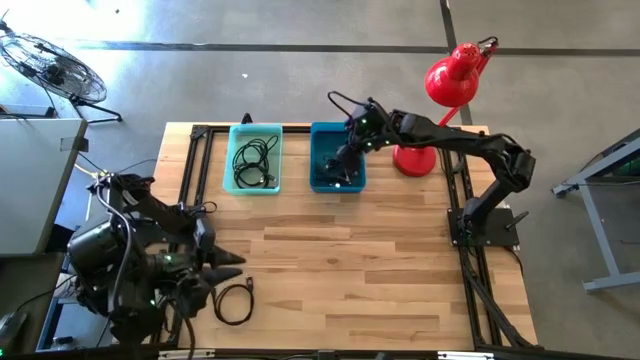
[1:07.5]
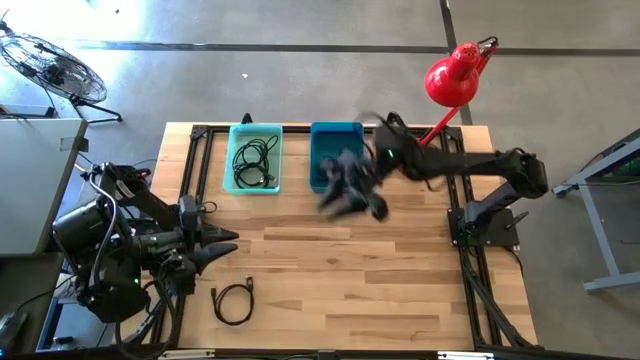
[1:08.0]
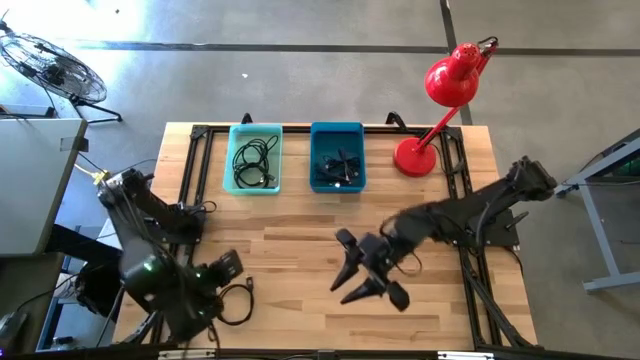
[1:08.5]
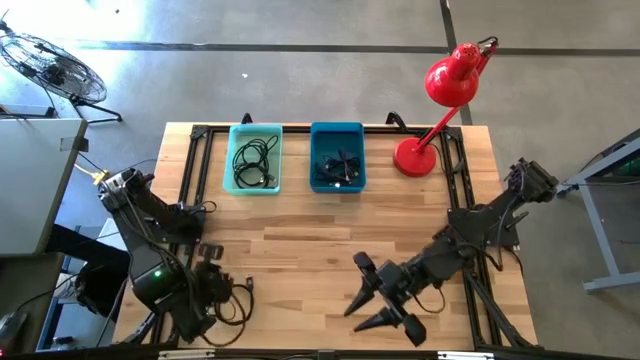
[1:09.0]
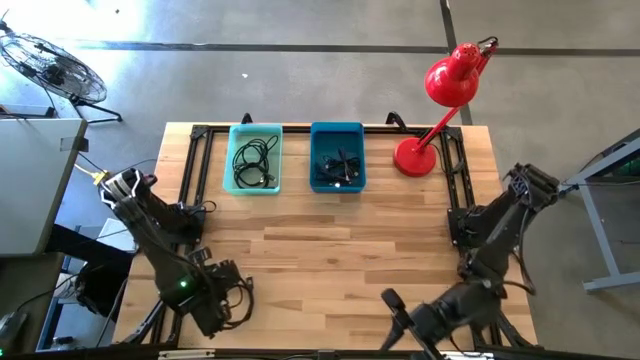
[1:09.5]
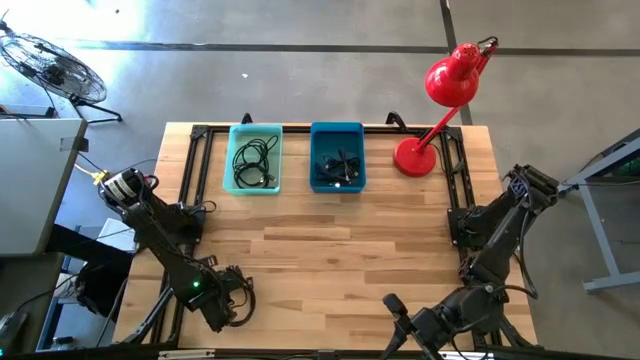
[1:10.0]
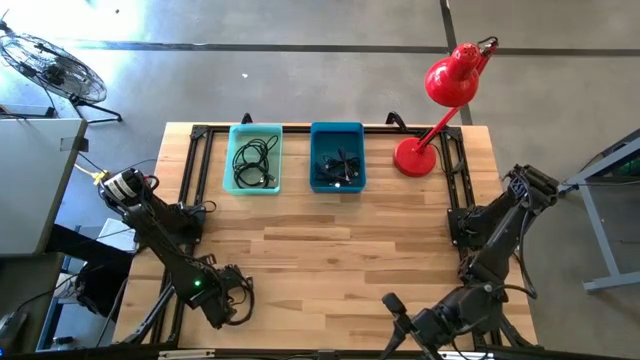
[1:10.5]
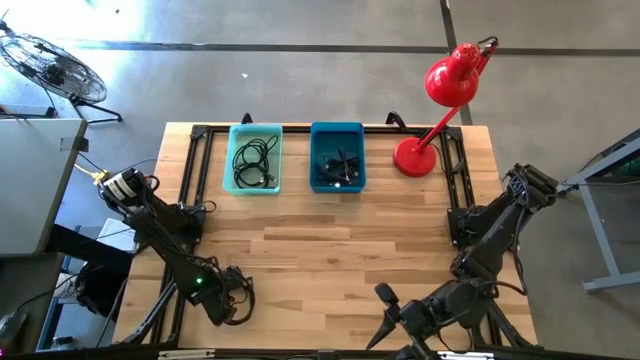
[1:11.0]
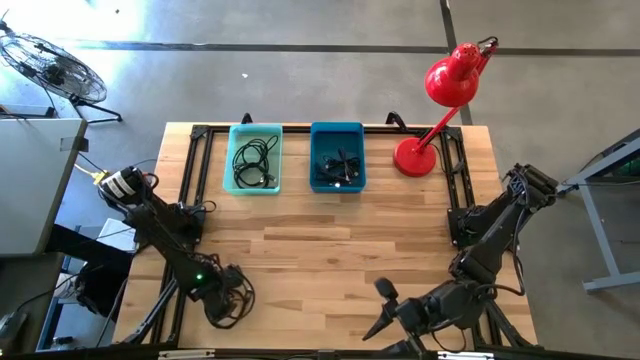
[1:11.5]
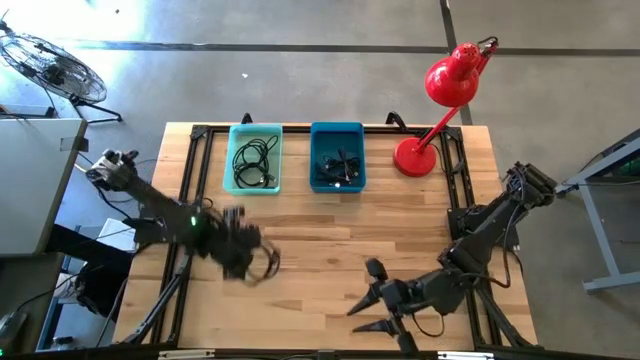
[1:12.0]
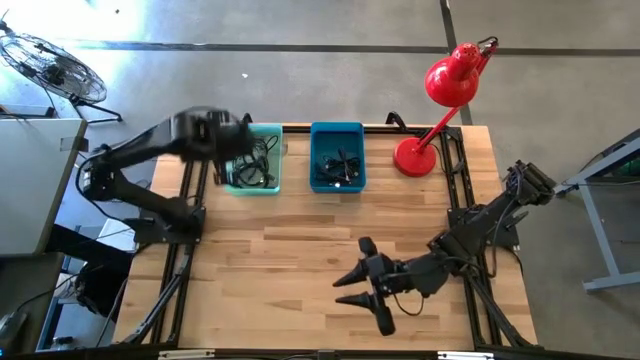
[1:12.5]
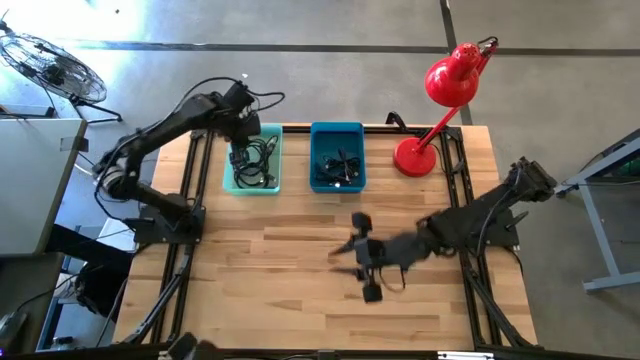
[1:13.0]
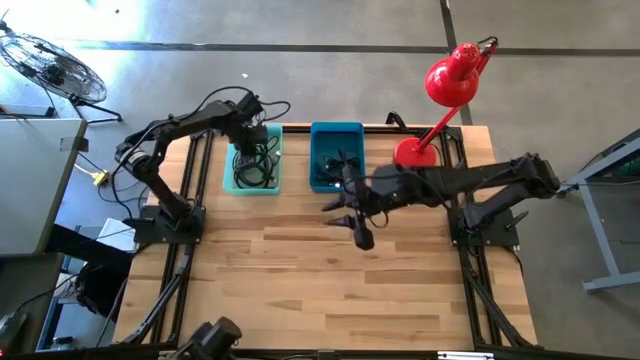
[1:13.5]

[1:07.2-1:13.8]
Task: Pick & Place USB Port
Put the black HDMI cable into the green bin

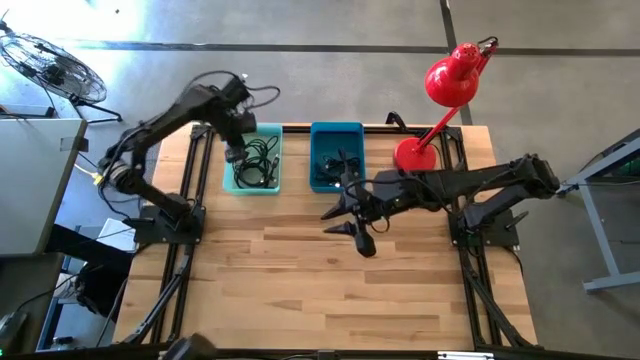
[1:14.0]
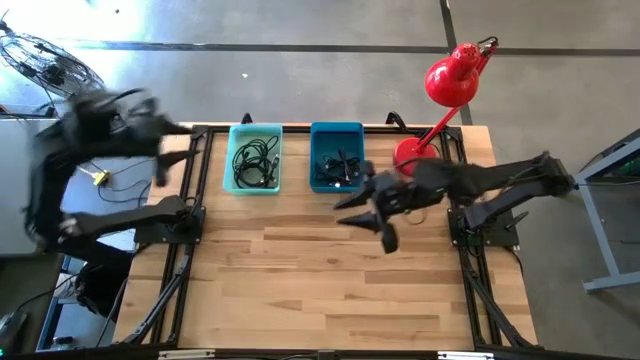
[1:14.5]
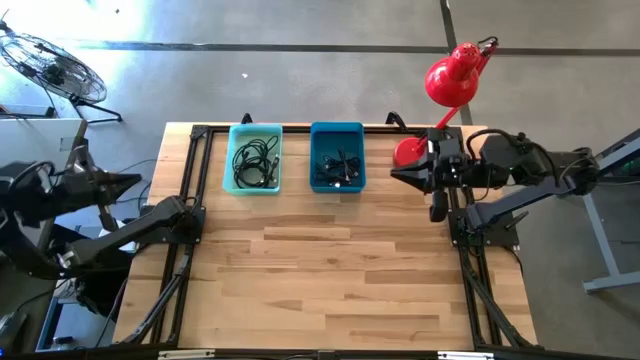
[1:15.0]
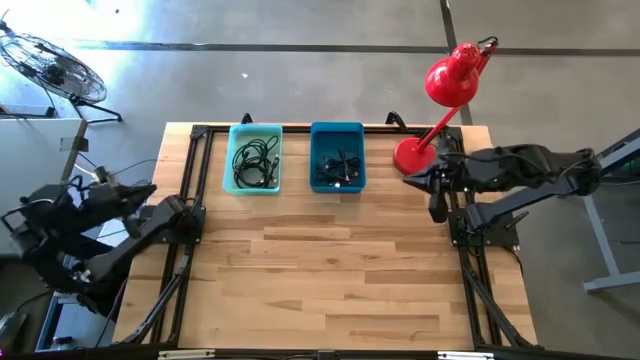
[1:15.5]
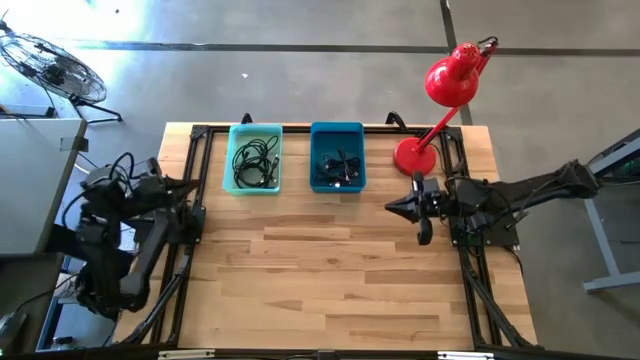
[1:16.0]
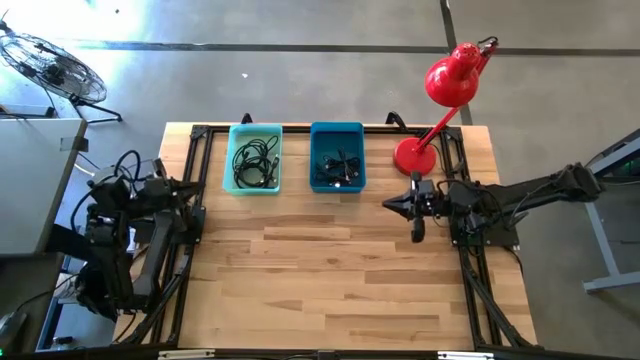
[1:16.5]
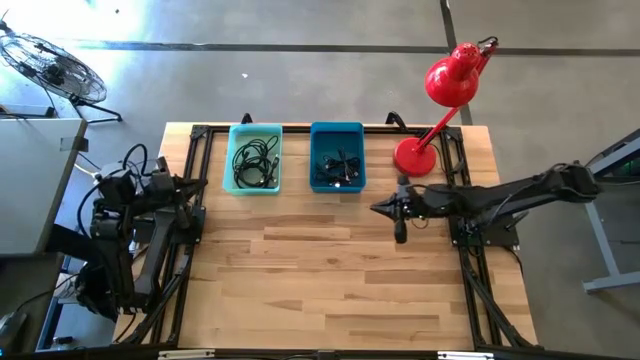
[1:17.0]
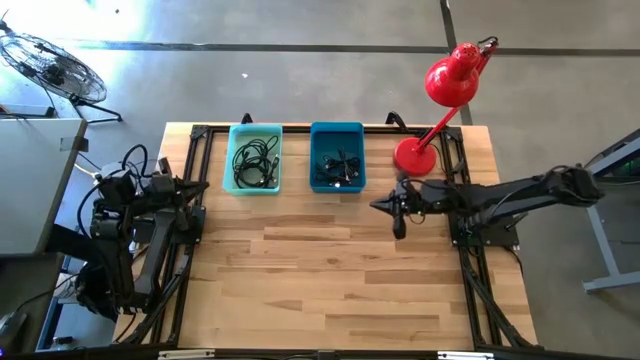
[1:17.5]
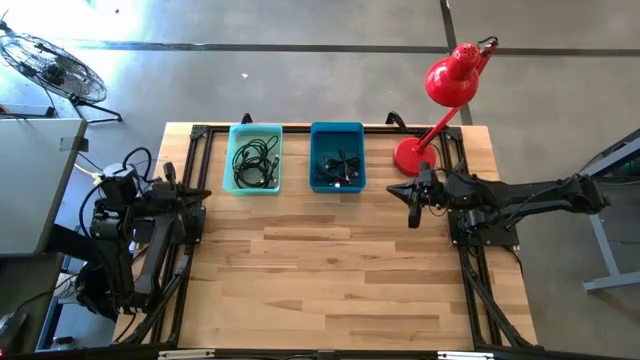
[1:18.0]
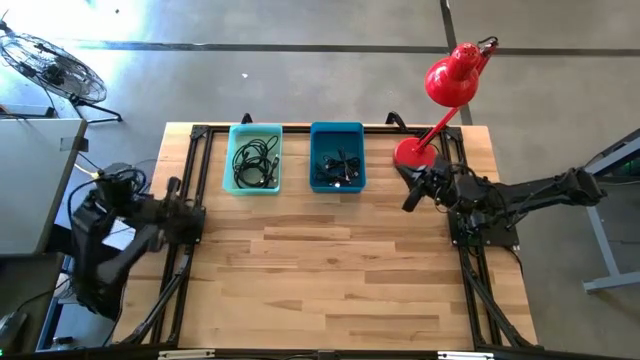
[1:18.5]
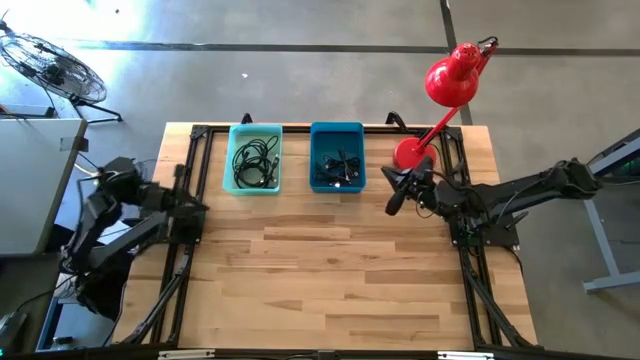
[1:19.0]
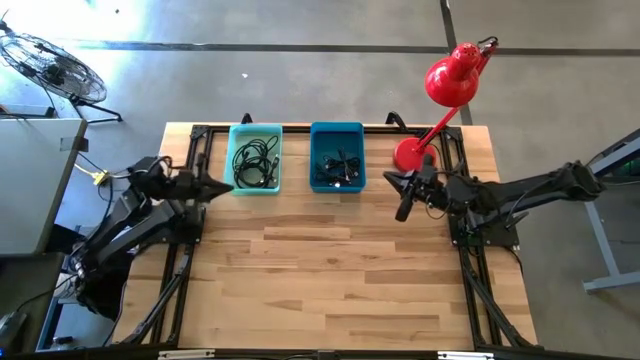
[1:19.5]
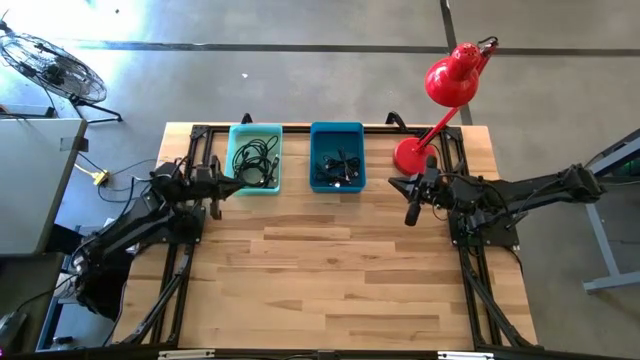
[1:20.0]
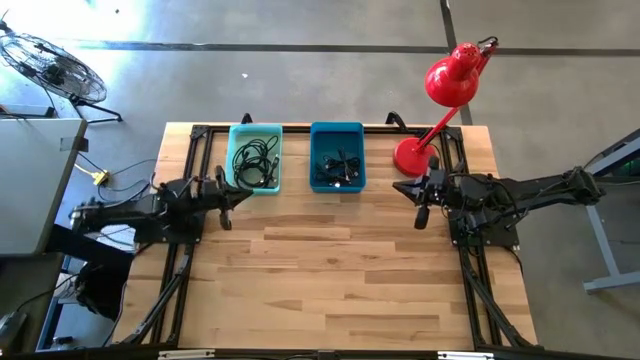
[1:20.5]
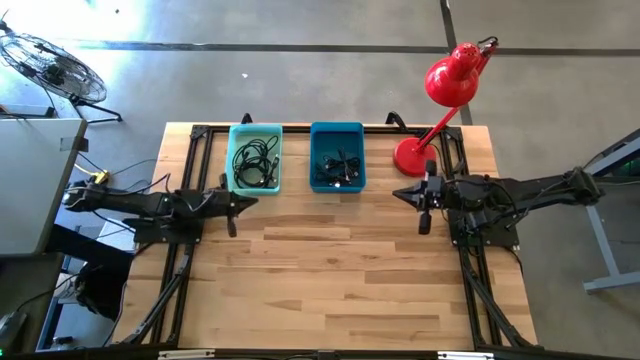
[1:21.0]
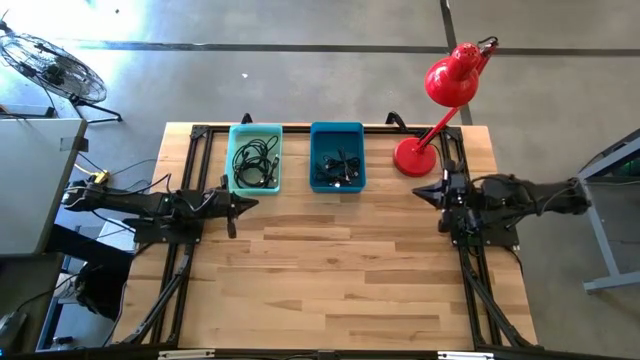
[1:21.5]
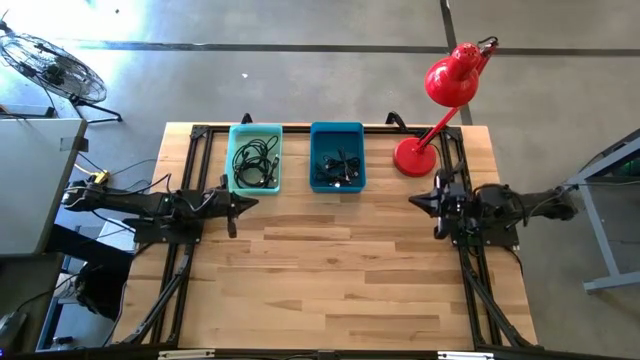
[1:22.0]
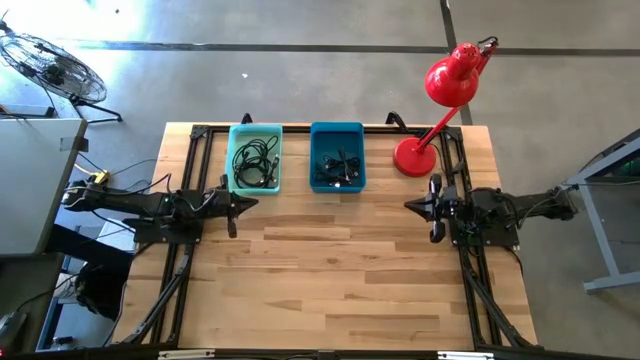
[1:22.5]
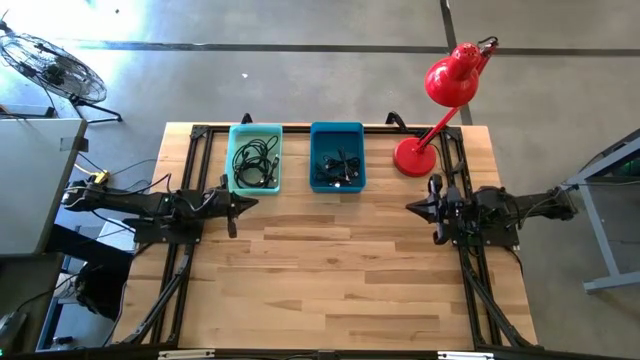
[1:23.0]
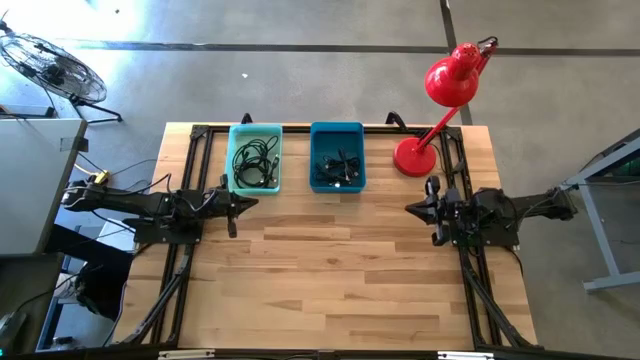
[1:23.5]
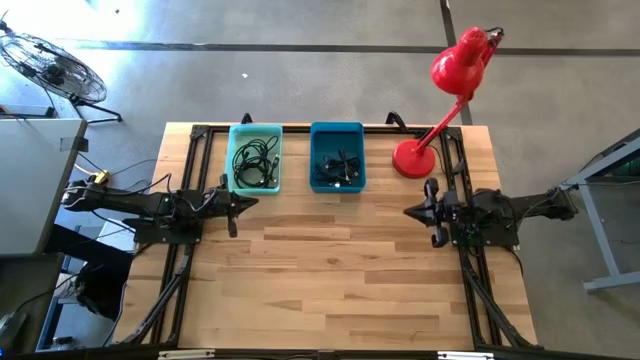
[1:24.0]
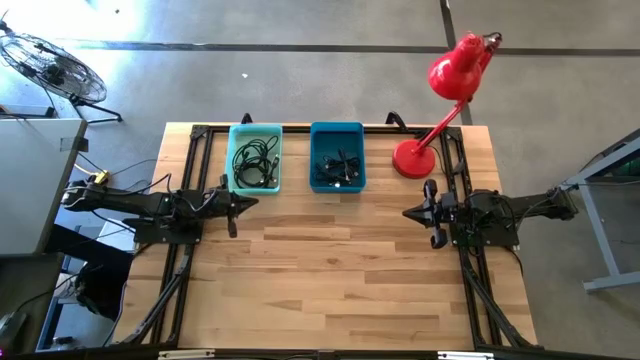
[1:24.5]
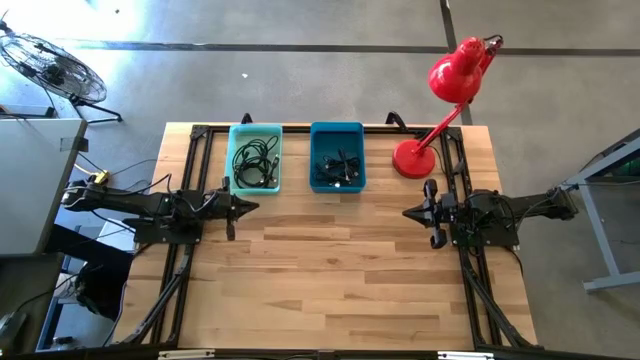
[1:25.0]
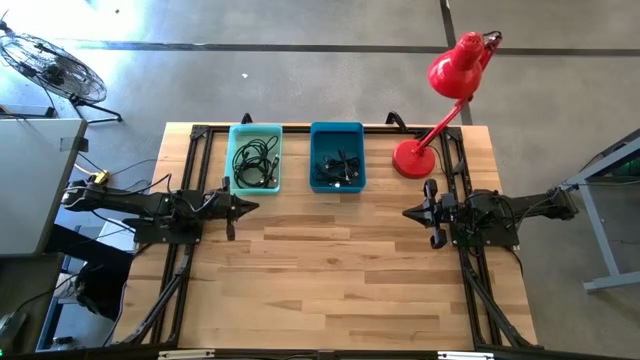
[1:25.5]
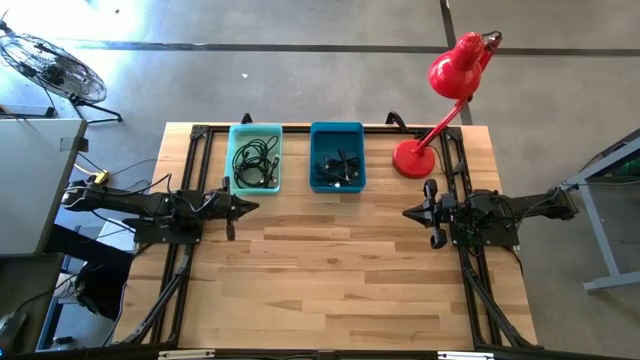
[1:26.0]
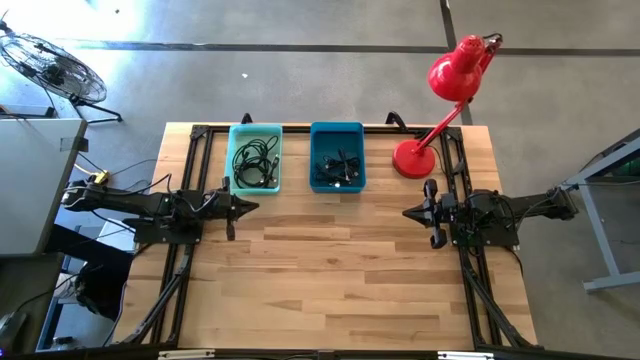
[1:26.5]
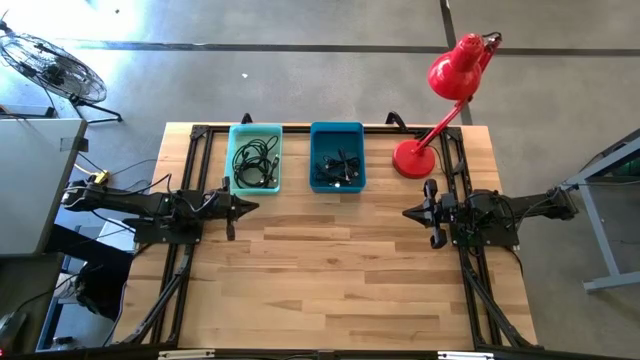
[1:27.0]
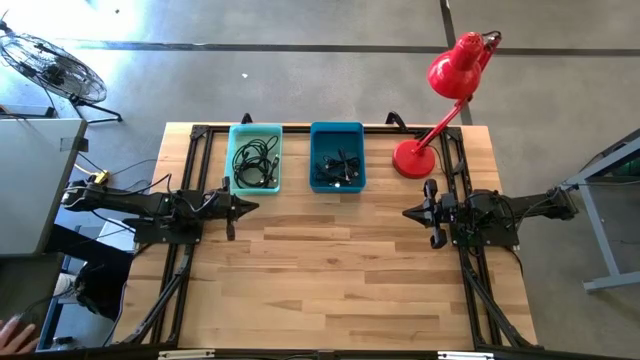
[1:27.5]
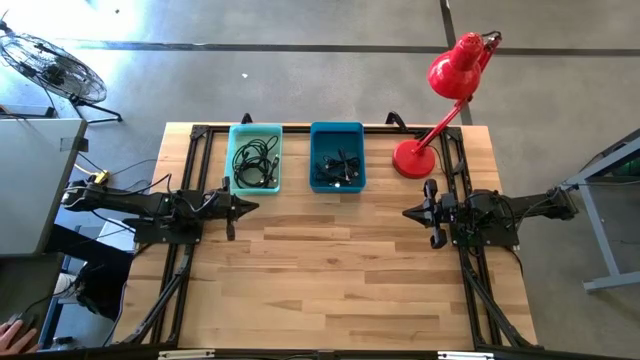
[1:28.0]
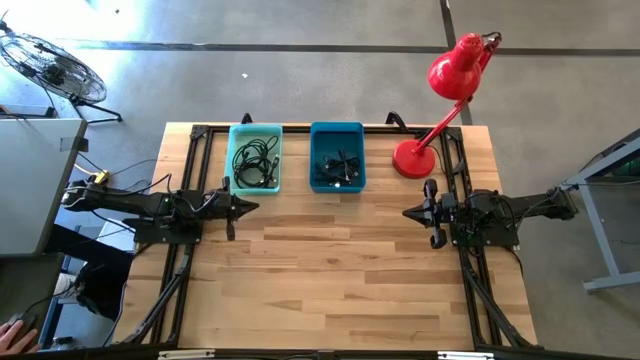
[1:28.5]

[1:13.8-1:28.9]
Return to Home Position
